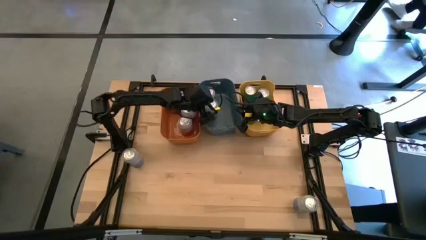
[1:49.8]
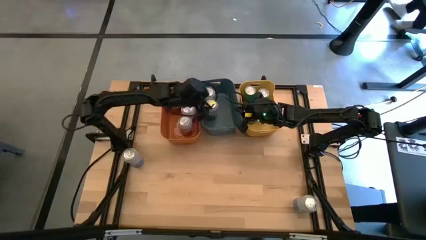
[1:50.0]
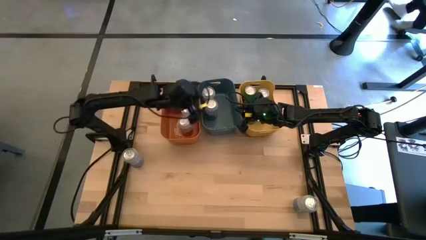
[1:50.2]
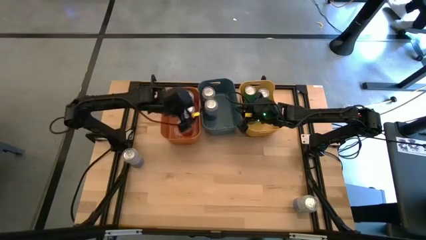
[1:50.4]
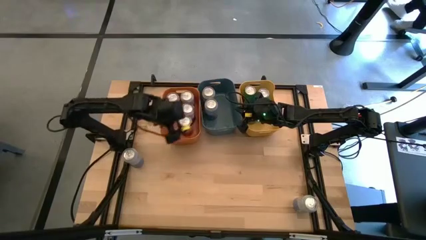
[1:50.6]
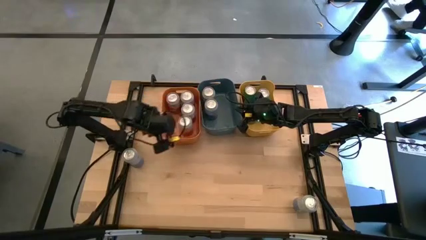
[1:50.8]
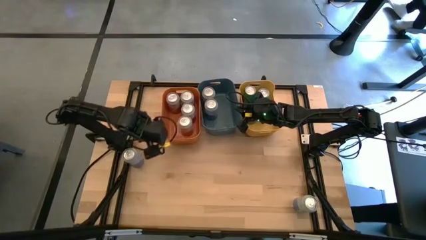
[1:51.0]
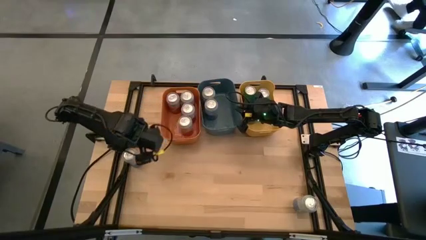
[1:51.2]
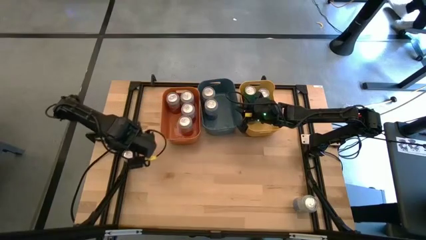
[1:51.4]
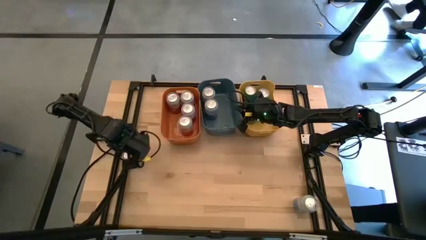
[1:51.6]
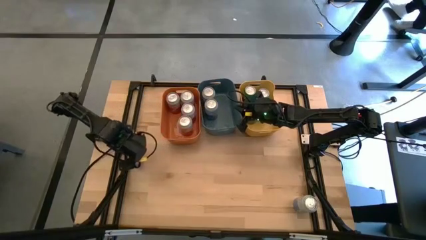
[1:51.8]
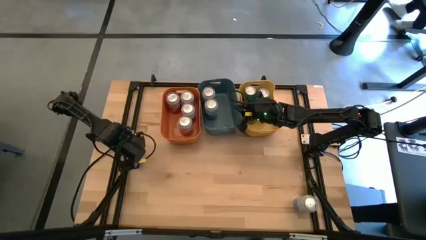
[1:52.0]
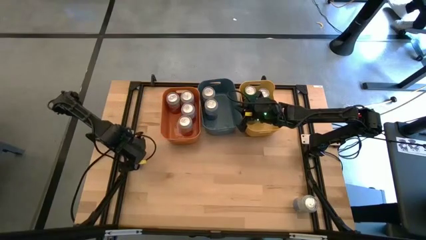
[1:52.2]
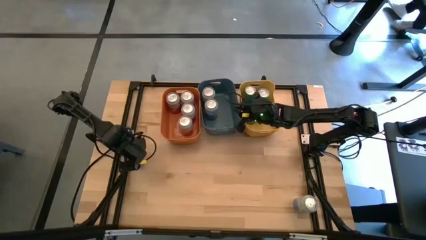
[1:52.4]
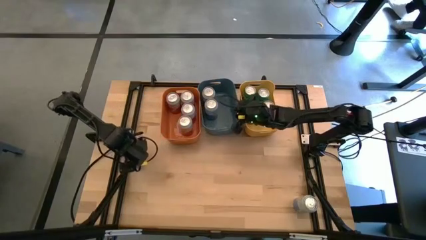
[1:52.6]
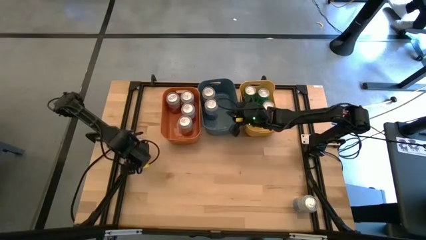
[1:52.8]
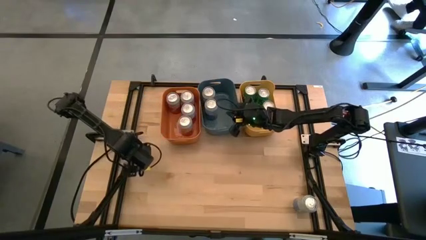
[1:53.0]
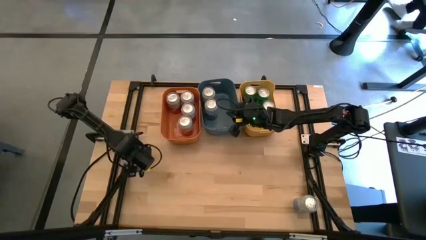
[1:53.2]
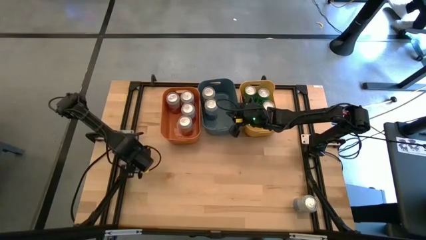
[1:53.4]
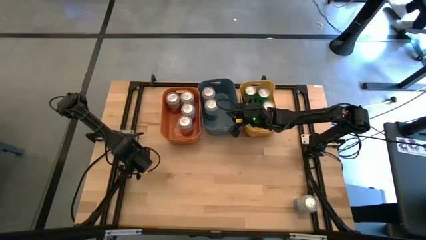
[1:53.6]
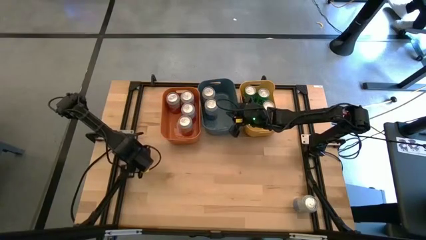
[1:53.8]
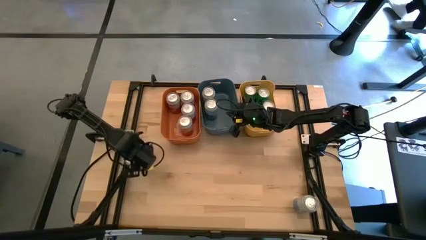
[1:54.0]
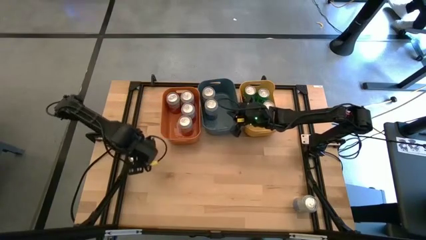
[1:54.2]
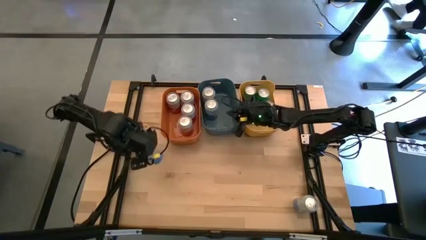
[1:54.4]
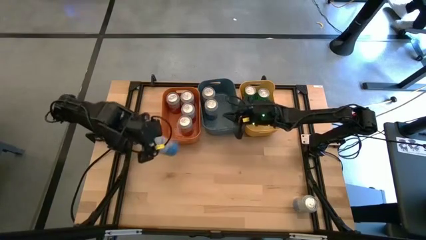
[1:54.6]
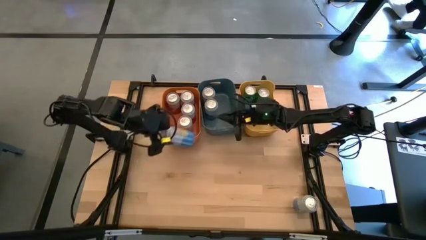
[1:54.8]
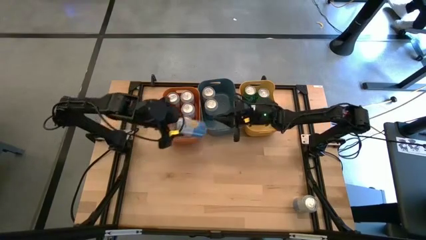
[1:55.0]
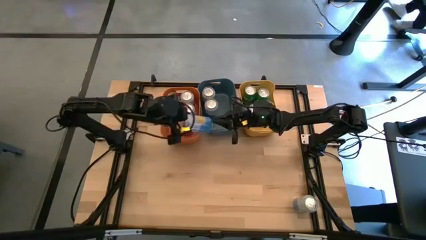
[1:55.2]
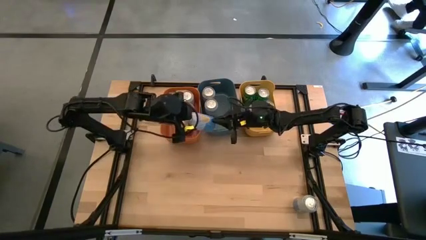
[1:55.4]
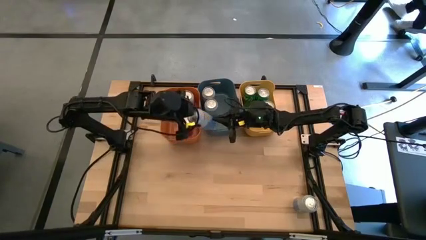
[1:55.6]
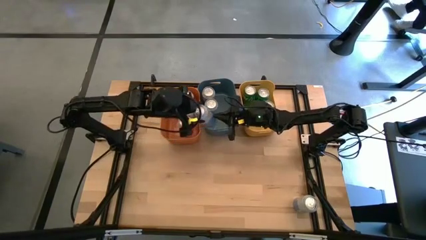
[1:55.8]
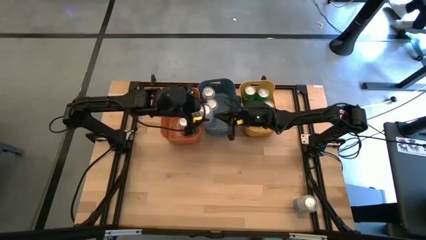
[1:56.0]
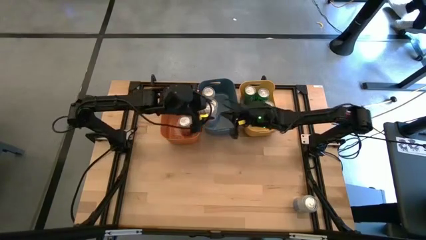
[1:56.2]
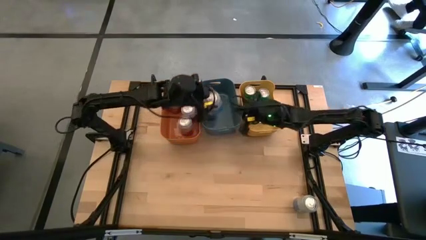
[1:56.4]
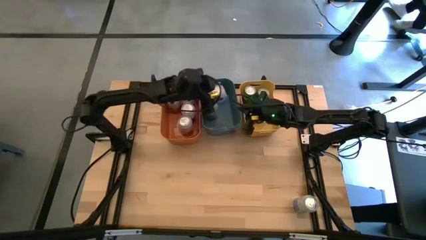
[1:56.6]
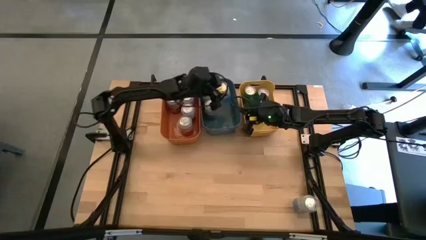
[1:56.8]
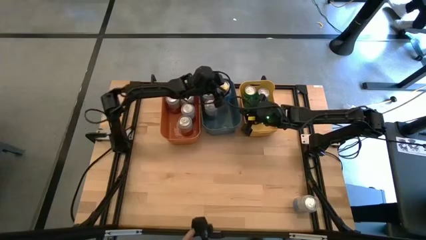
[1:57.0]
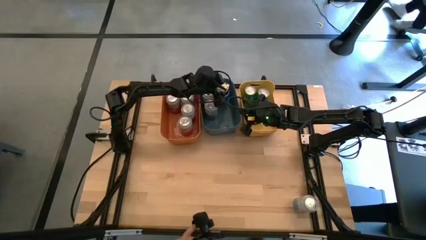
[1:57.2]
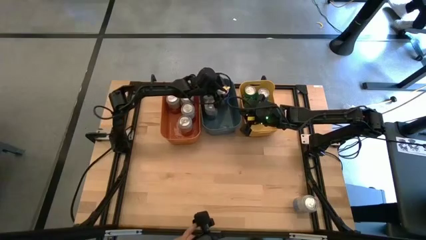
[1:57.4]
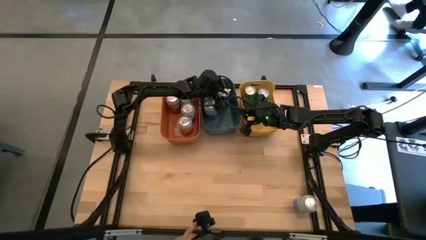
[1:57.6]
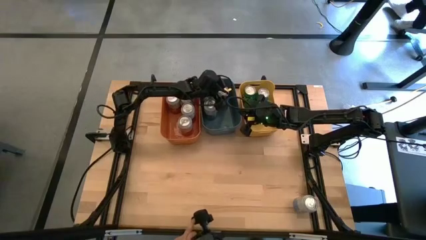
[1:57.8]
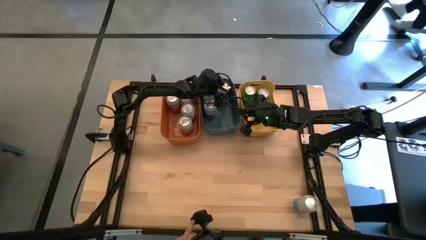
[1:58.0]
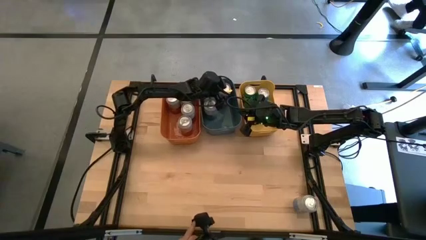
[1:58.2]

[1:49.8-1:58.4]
Task: Sort soda cans
Put the blue-white soda can into the blue bin

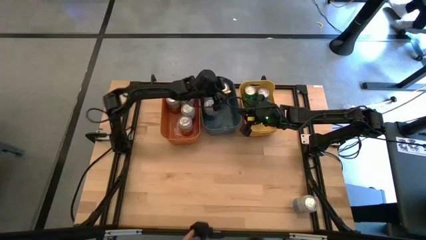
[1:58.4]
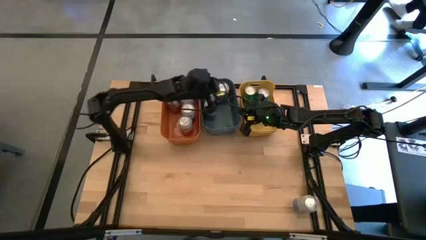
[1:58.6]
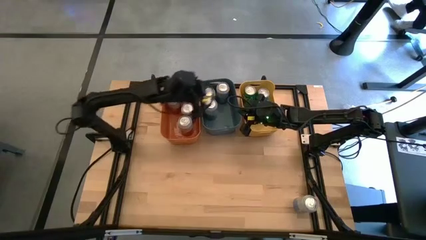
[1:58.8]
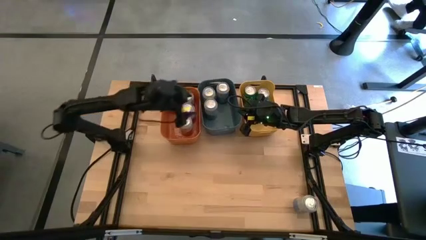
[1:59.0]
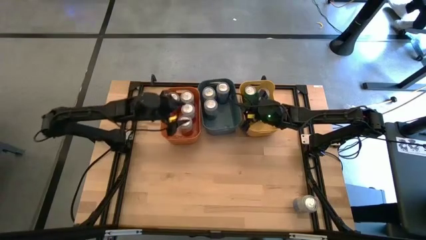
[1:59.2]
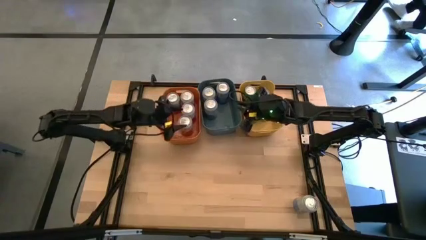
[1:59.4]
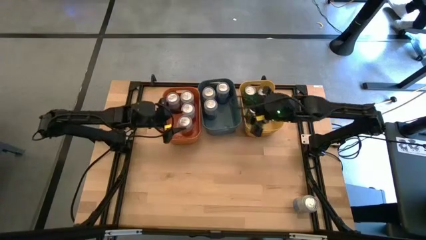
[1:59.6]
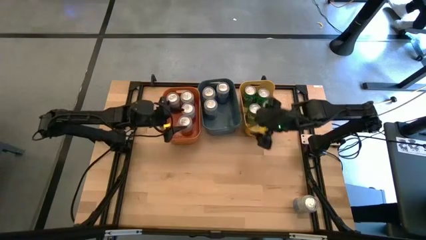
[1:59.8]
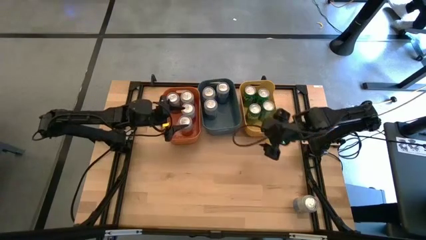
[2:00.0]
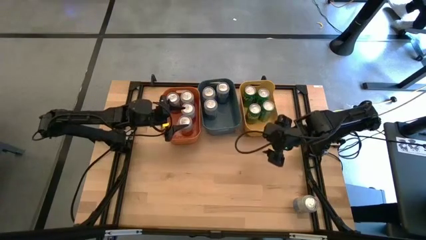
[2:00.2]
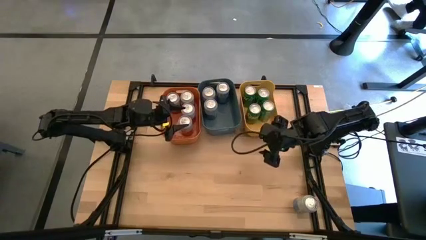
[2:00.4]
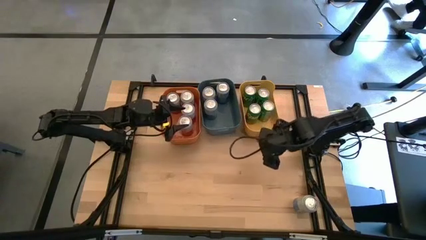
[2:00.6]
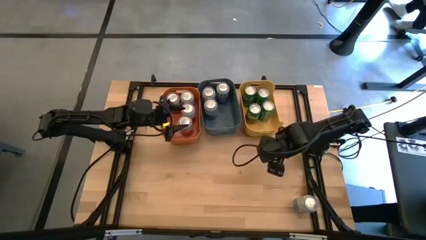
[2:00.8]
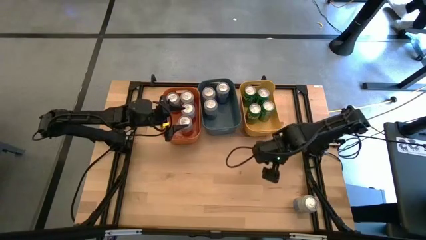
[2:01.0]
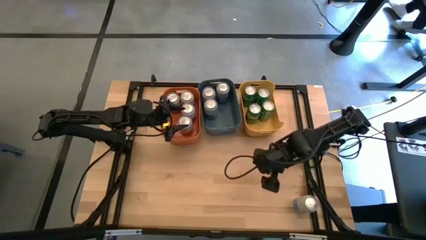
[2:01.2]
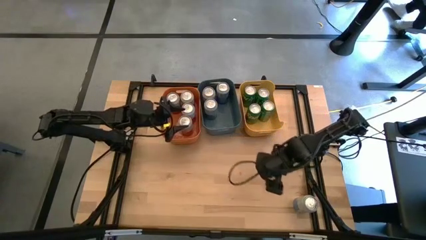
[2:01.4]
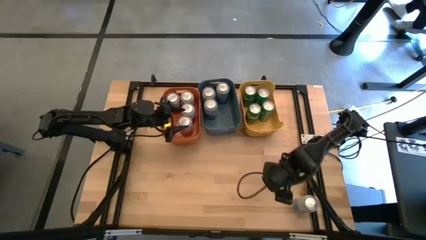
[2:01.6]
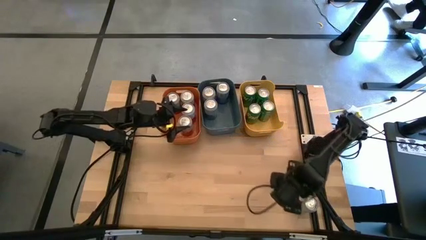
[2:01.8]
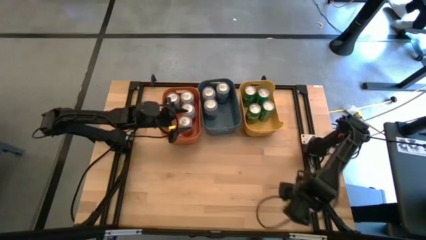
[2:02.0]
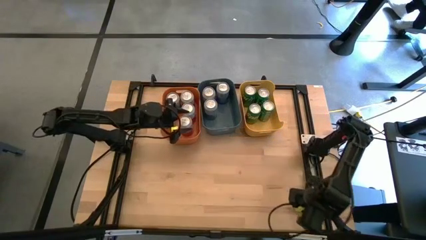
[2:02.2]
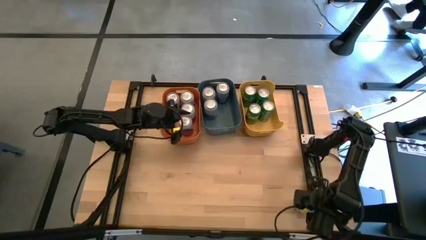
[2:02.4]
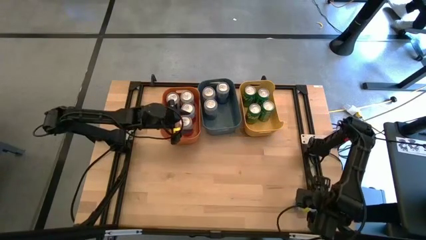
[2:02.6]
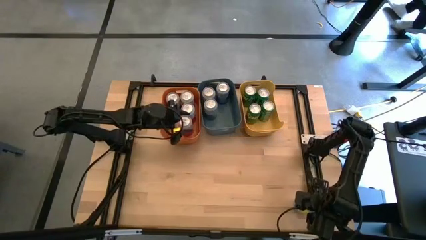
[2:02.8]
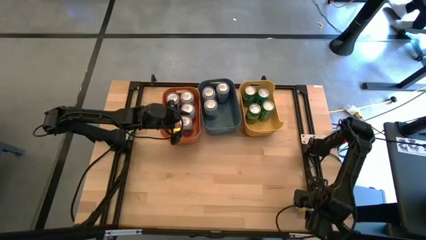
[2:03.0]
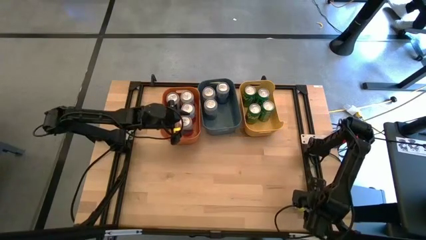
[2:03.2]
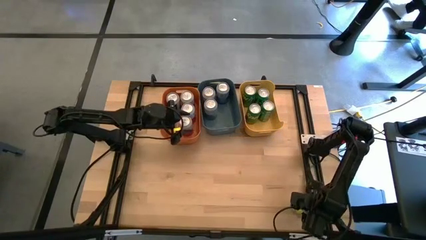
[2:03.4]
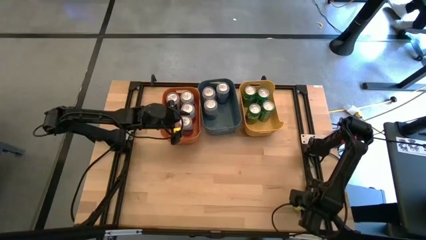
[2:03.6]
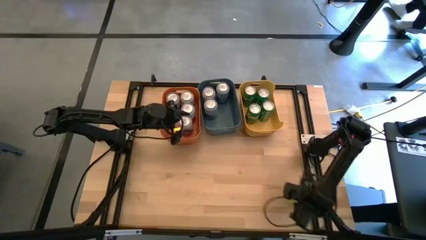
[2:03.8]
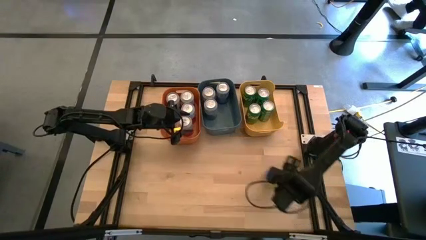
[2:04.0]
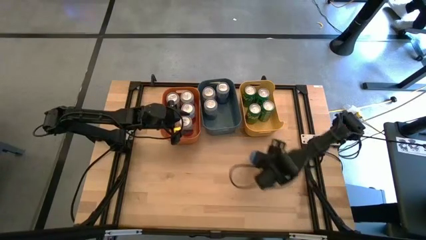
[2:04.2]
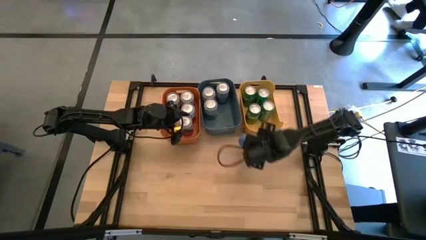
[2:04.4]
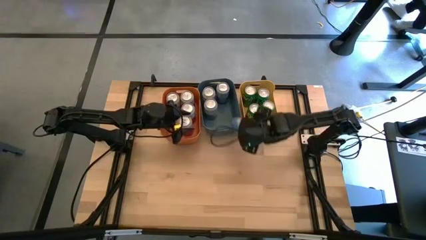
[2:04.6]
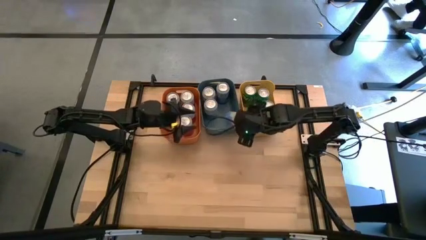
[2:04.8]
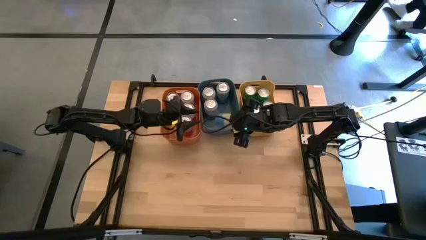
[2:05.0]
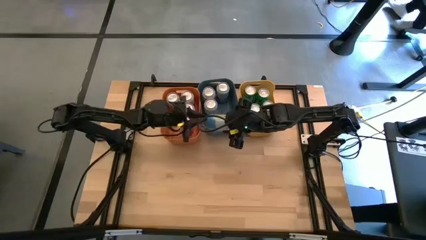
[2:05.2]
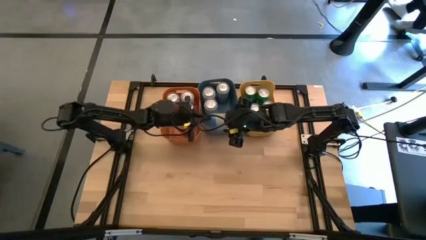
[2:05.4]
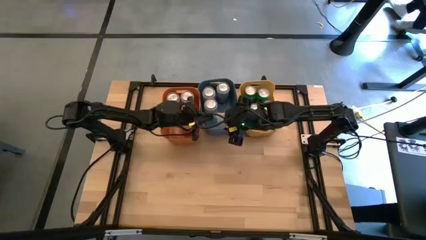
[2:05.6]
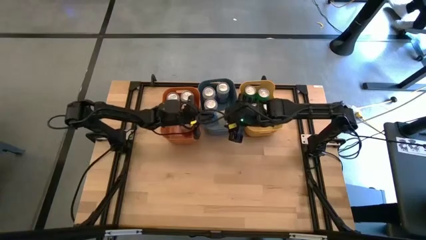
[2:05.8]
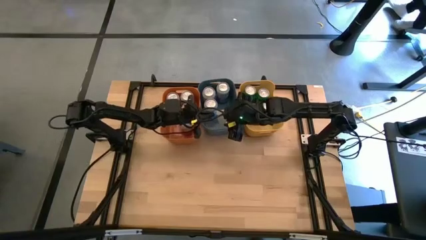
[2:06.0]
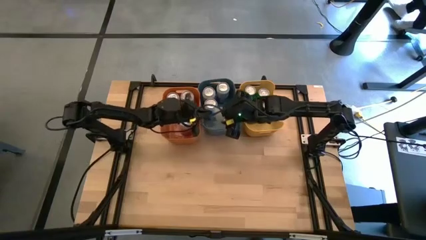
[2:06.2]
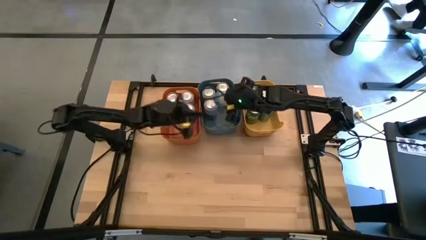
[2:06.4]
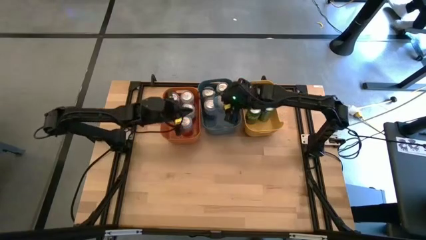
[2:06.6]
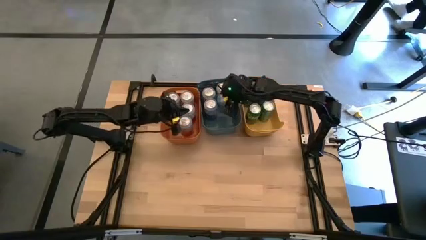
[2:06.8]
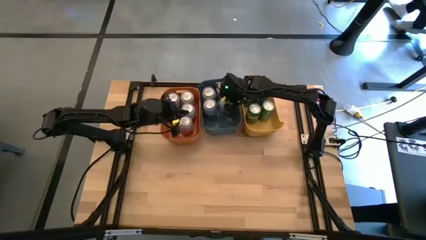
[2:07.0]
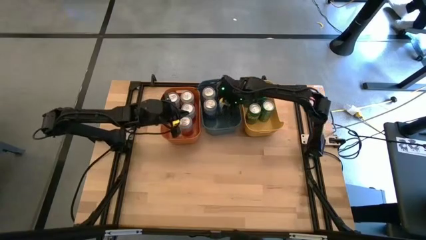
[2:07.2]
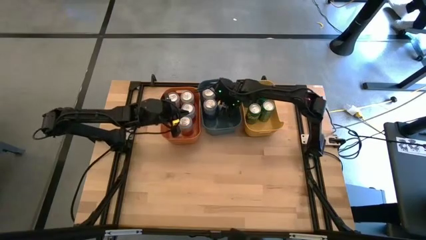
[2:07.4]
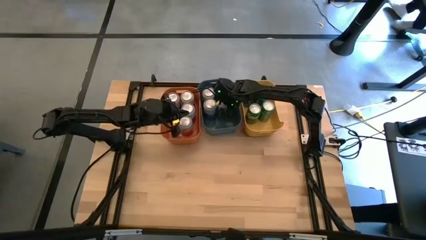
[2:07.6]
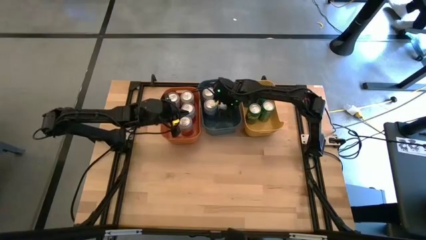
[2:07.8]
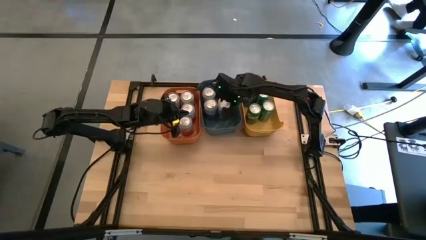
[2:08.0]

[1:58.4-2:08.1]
Put the blue-white soda can into the blue bin
